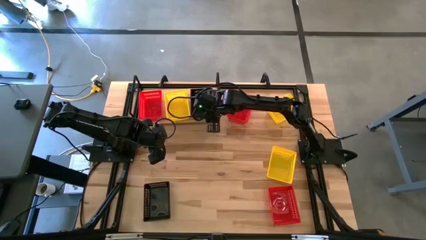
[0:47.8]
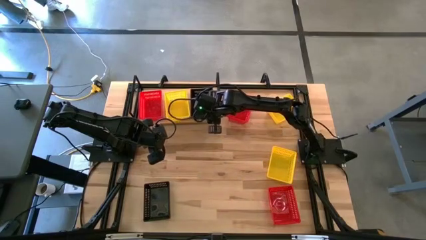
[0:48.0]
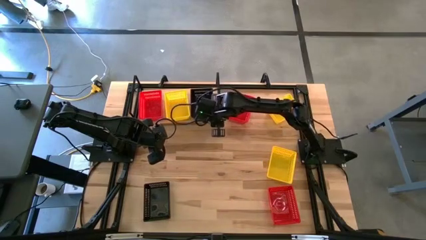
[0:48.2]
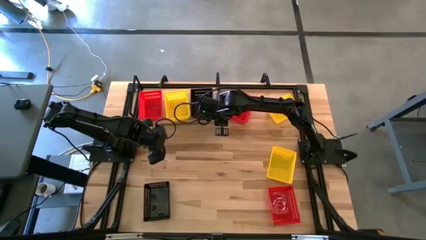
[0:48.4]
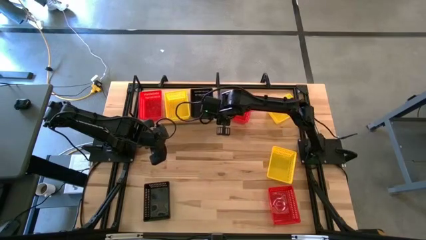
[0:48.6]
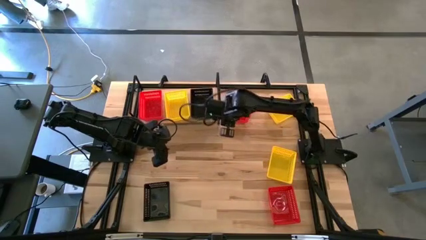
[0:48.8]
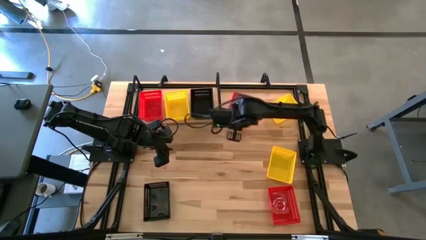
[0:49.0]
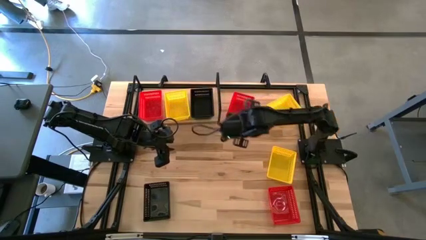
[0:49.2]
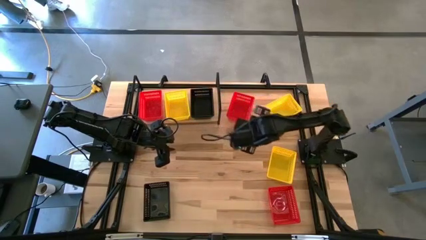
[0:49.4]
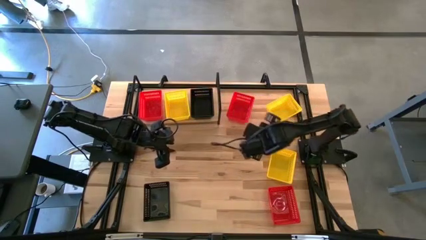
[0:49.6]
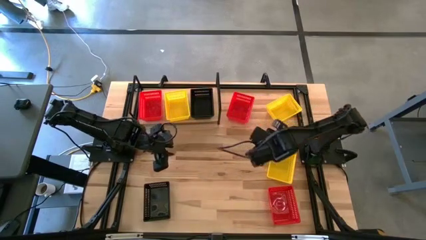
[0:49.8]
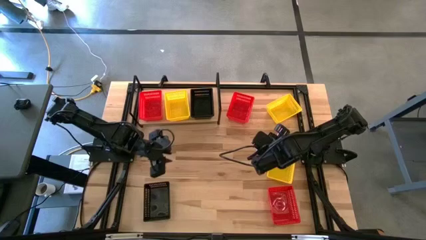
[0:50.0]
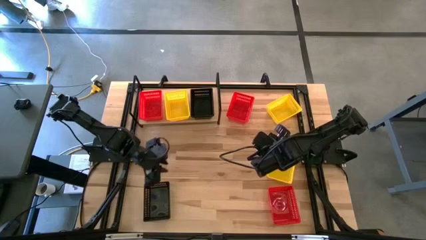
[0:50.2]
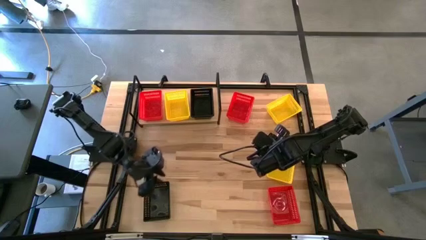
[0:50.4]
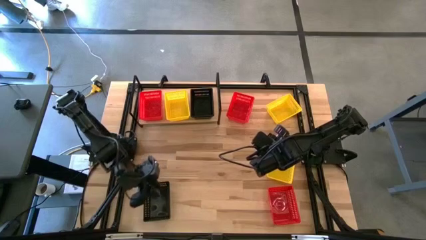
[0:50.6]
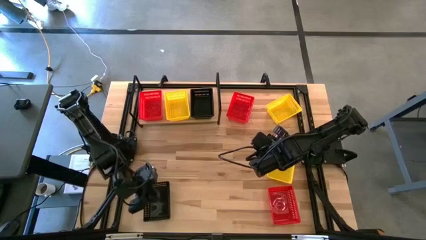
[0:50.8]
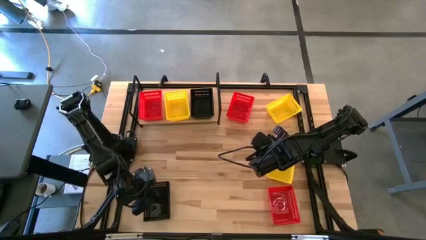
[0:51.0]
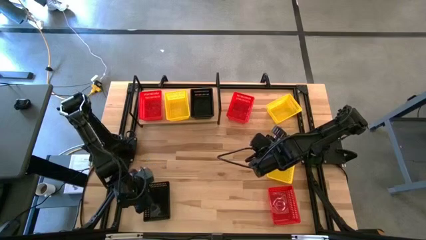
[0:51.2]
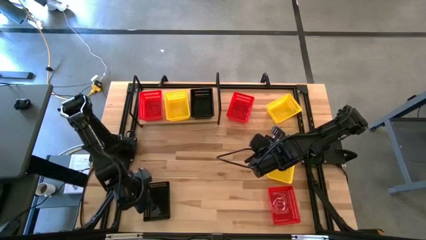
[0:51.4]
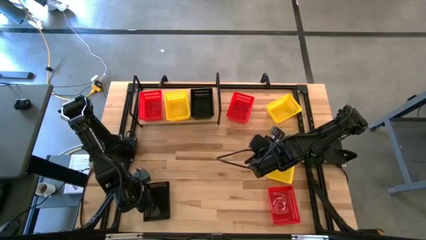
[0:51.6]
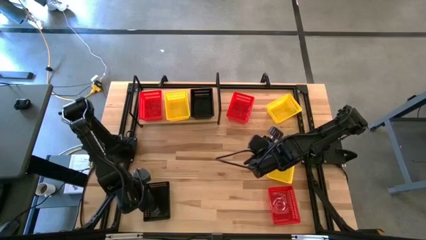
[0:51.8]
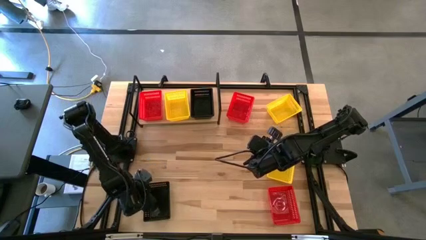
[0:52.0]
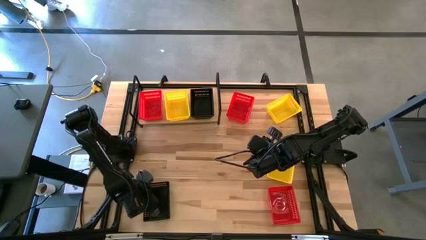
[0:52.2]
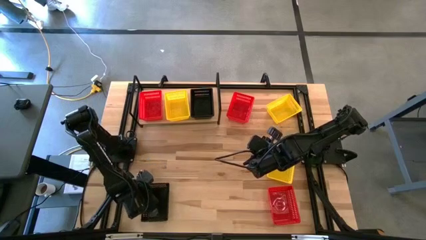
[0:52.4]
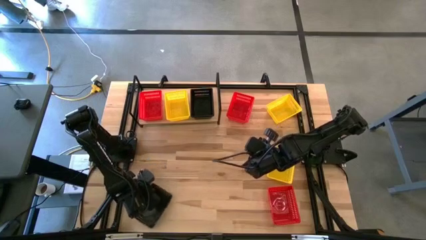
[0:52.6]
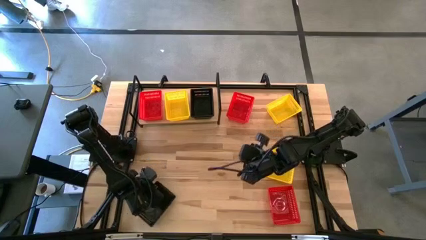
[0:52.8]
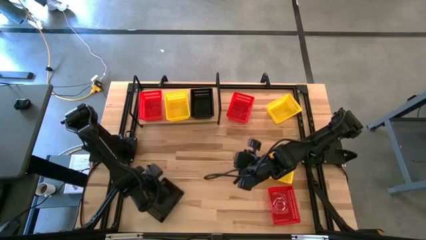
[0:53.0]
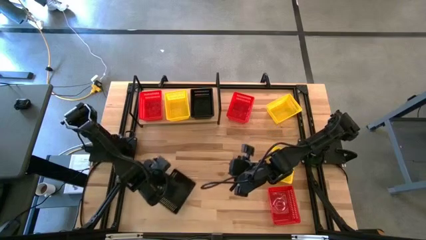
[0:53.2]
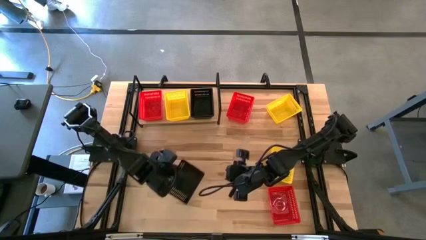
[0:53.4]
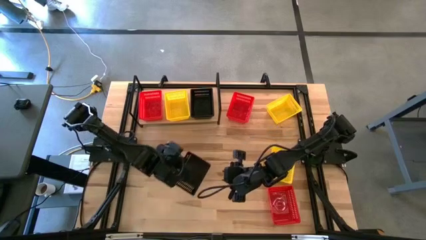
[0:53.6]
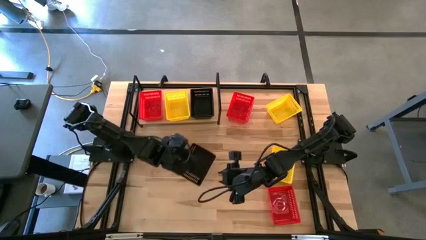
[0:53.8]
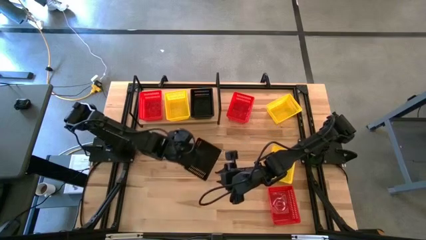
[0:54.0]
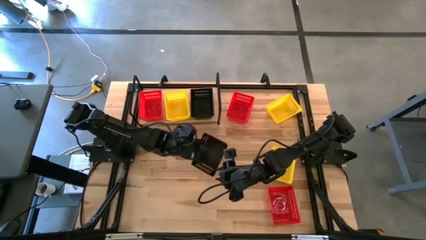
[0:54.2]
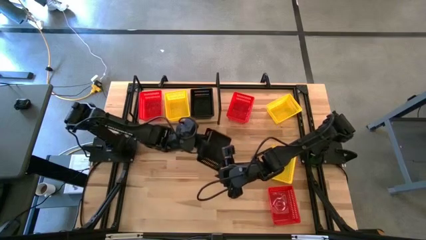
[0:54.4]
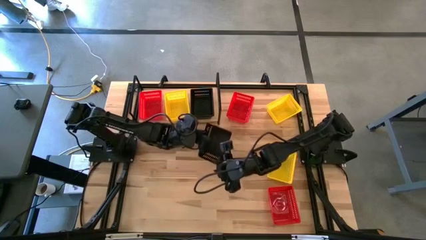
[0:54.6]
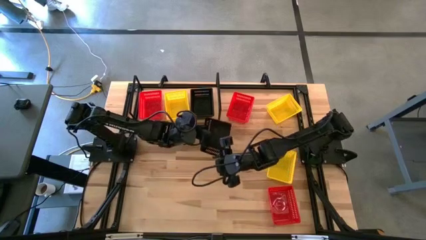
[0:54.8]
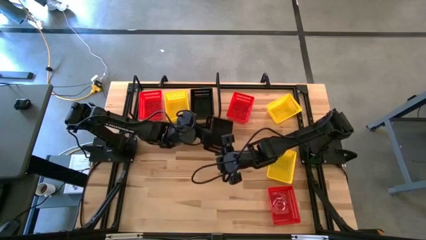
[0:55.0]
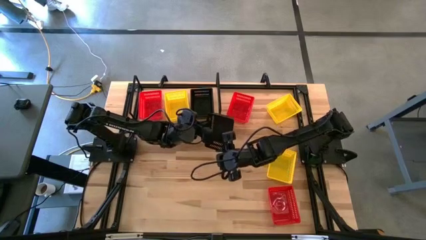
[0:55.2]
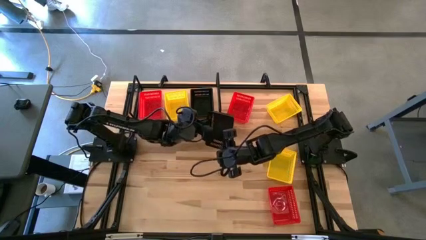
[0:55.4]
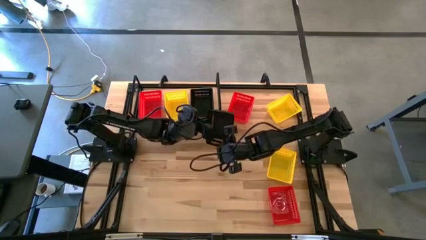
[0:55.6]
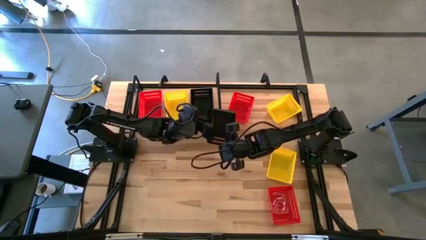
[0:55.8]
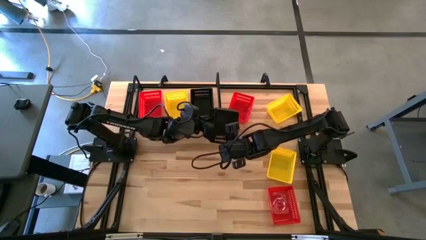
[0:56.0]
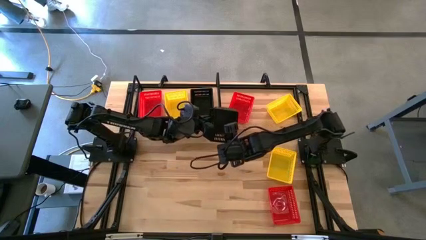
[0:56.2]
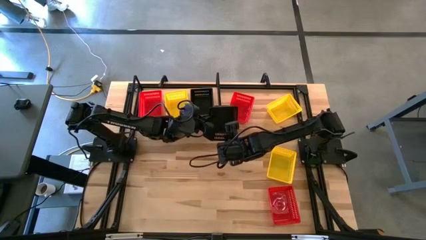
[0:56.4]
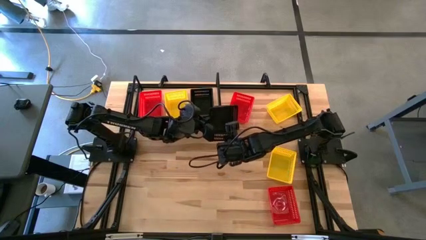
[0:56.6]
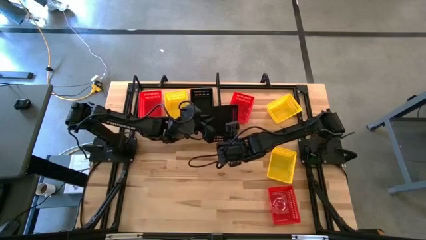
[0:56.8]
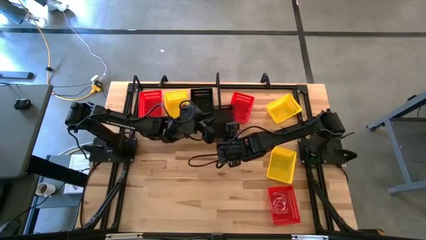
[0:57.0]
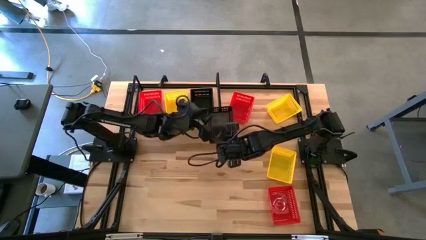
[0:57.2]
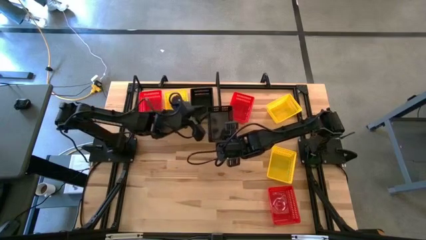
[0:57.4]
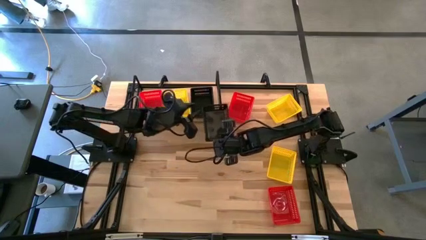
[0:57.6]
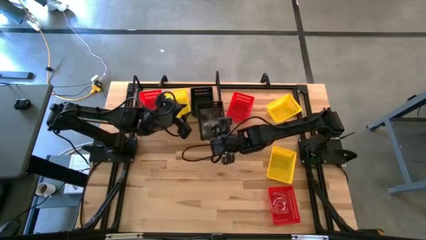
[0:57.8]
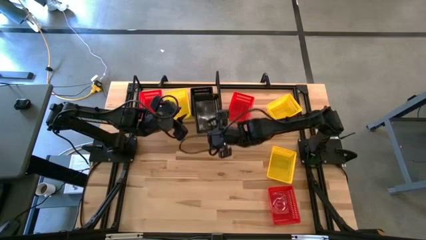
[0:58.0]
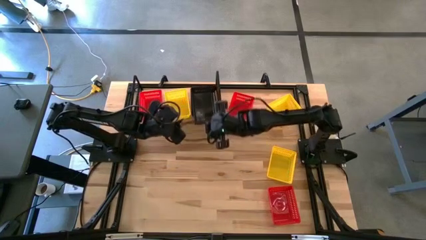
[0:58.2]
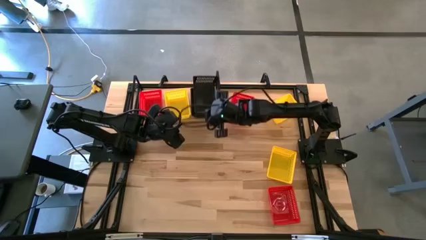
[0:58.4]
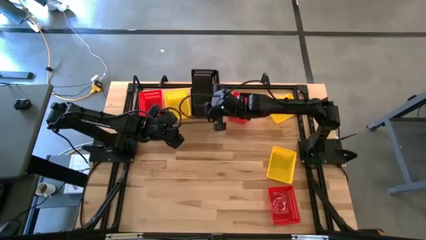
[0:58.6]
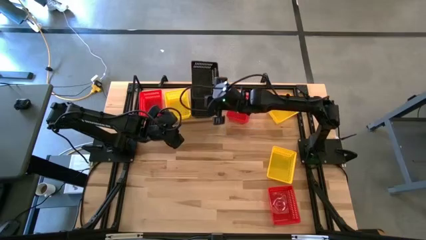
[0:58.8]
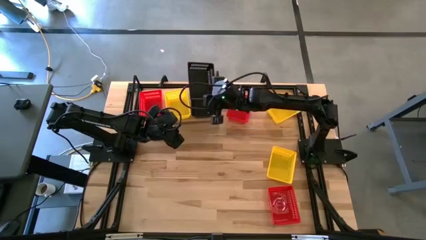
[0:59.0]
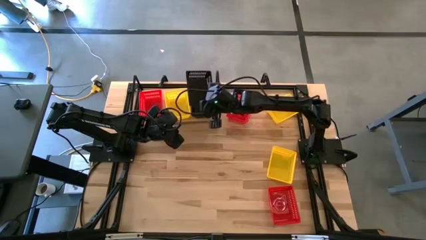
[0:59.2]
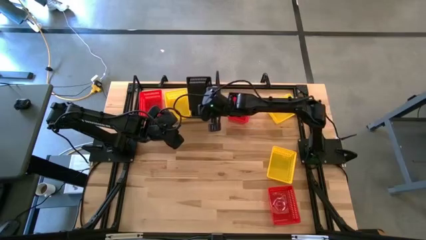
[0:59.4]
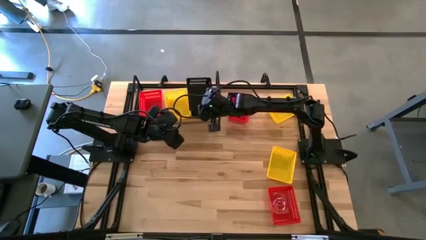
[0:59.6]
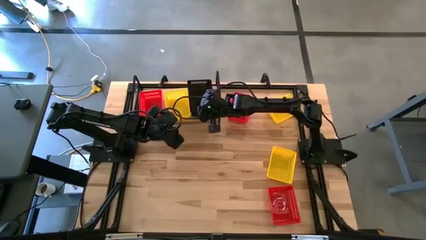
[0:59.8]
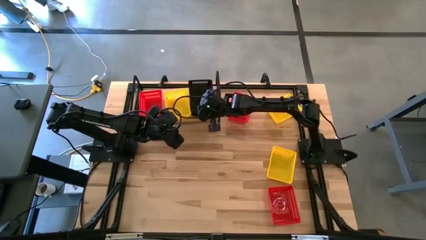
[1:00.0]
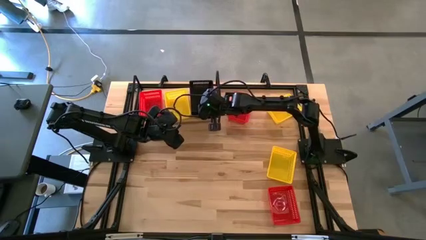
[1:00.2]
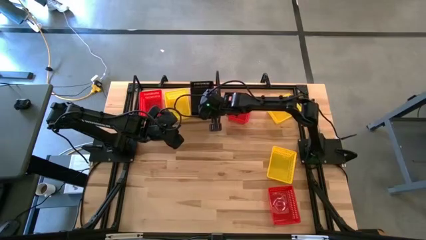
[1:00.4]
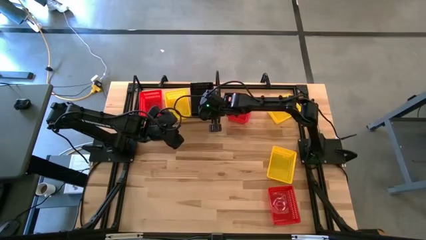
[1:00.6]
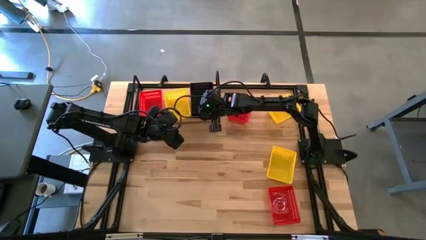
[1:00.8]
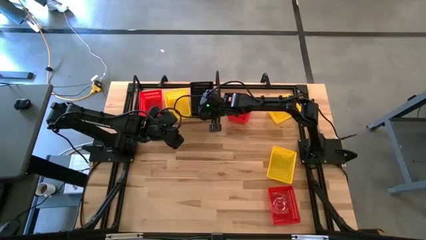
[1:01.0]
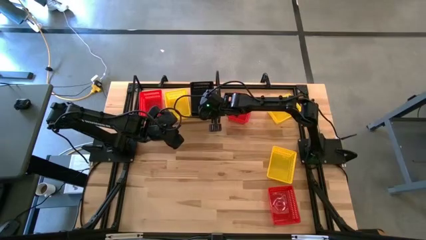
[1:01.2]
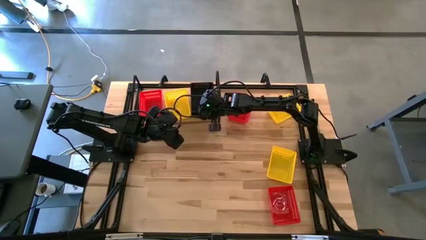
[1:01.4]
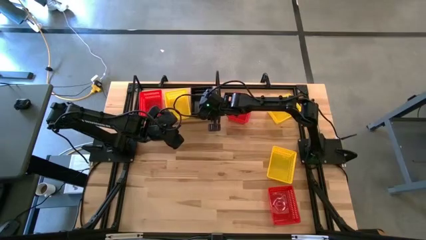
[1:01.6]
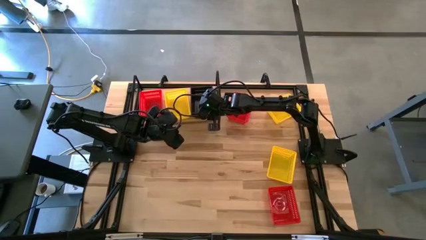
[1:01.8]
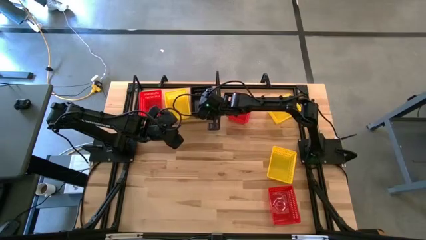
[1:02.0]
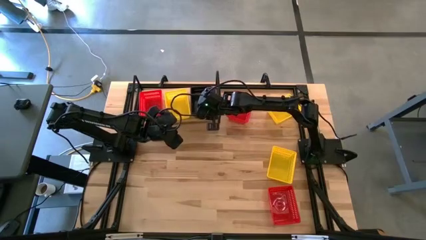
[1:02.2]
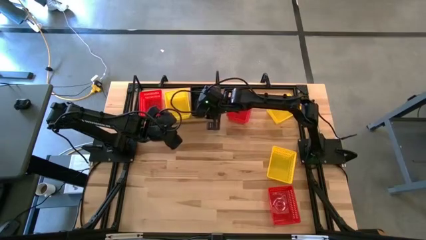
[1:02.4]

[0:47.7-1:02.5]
Task: Stack baskets on shelf by color
Stack the black bin on top of the black bin on the shelf
